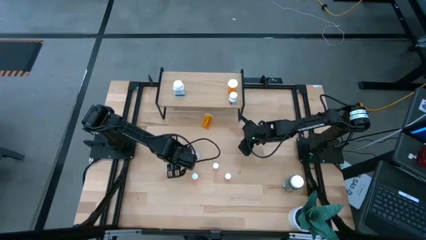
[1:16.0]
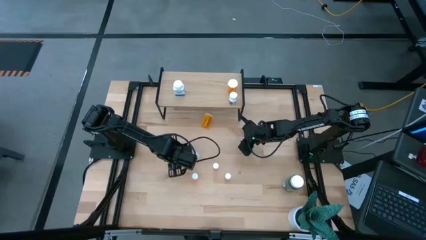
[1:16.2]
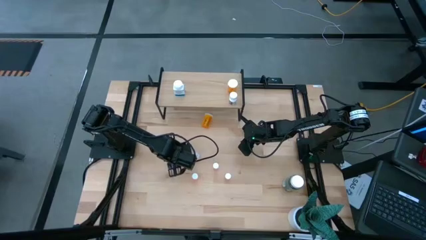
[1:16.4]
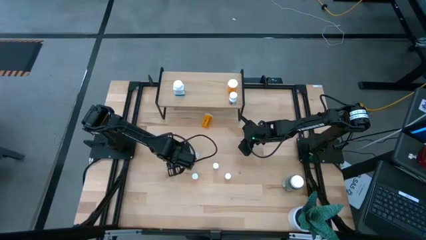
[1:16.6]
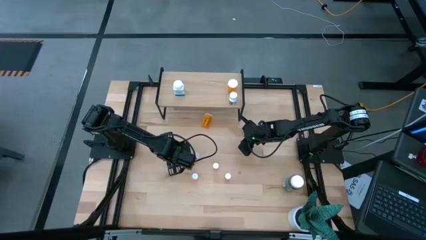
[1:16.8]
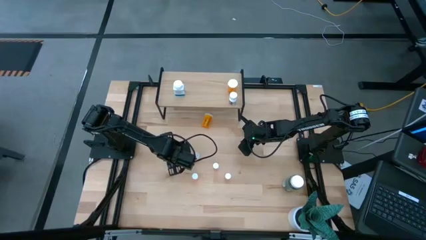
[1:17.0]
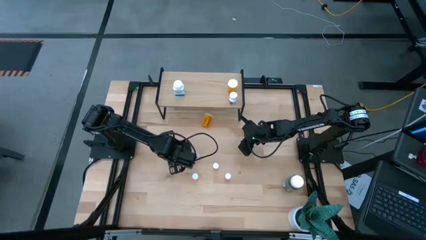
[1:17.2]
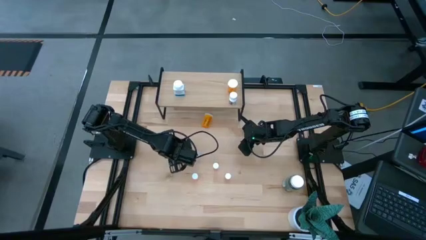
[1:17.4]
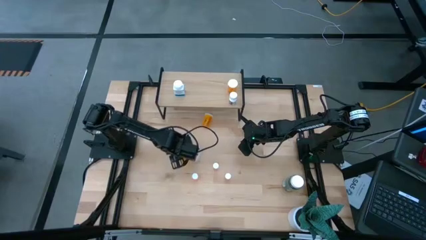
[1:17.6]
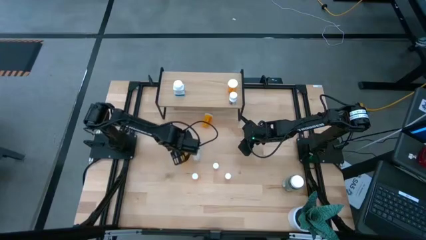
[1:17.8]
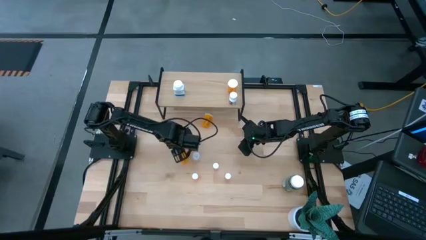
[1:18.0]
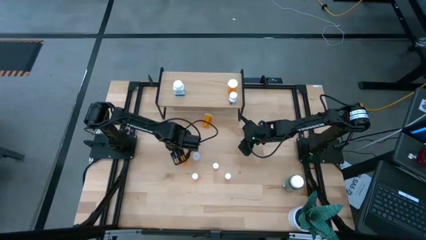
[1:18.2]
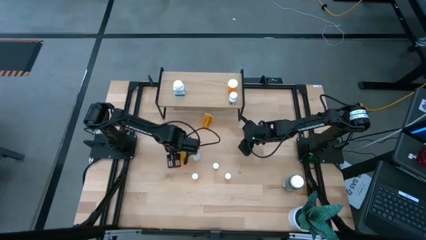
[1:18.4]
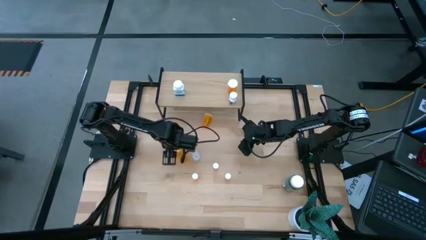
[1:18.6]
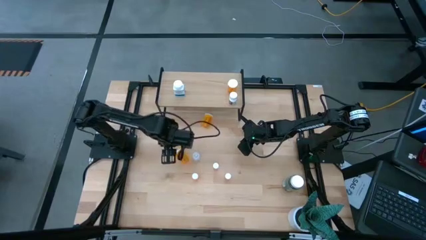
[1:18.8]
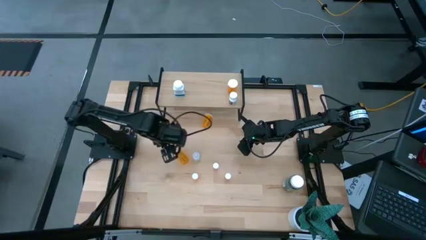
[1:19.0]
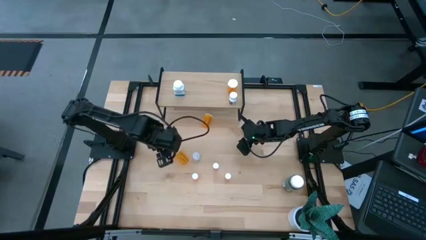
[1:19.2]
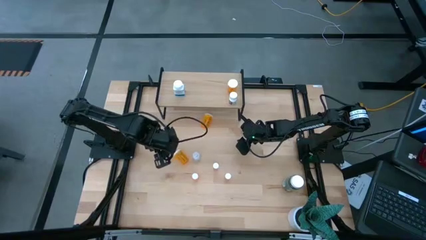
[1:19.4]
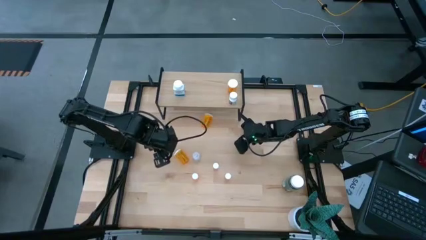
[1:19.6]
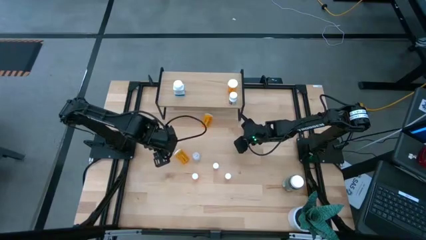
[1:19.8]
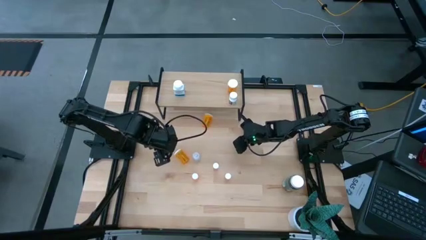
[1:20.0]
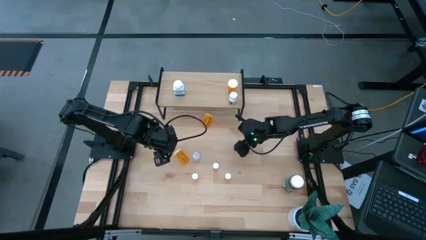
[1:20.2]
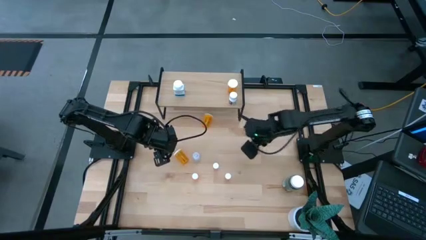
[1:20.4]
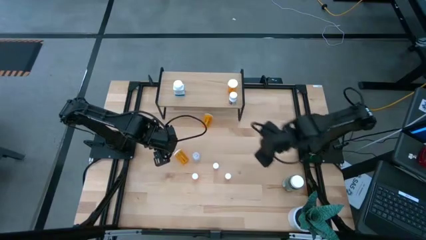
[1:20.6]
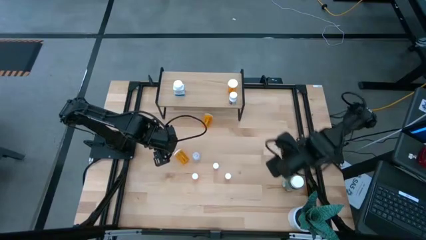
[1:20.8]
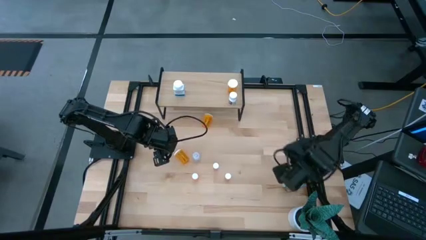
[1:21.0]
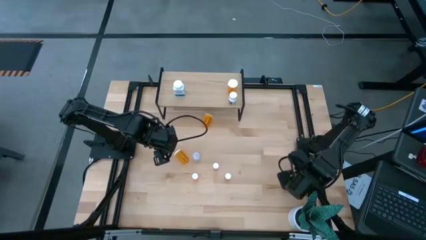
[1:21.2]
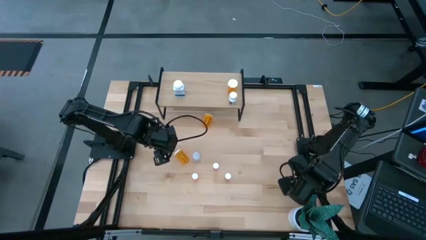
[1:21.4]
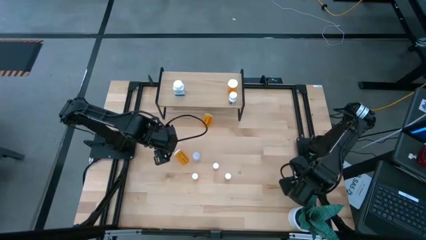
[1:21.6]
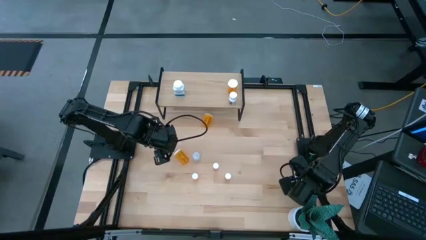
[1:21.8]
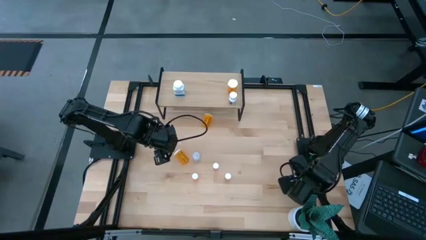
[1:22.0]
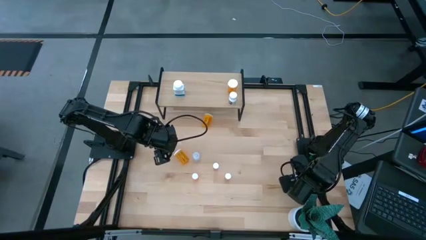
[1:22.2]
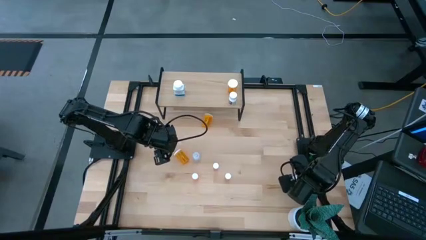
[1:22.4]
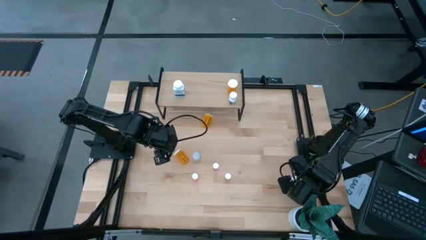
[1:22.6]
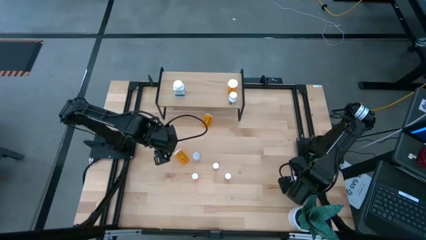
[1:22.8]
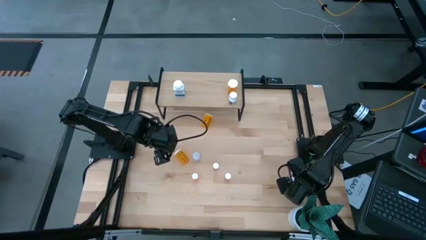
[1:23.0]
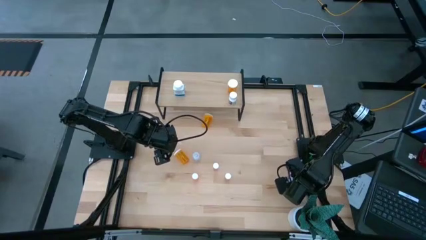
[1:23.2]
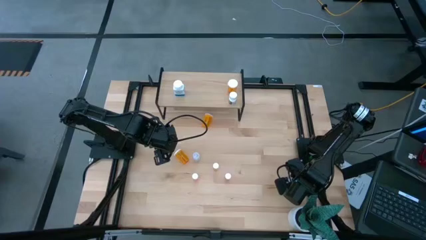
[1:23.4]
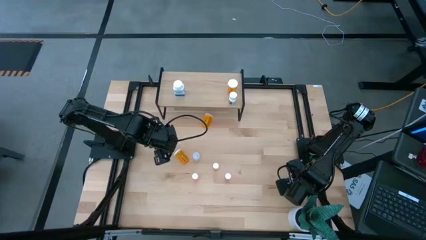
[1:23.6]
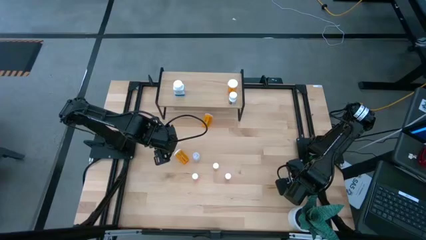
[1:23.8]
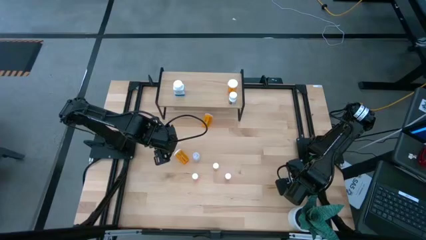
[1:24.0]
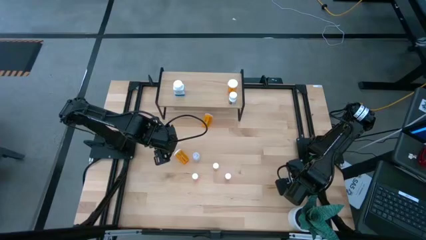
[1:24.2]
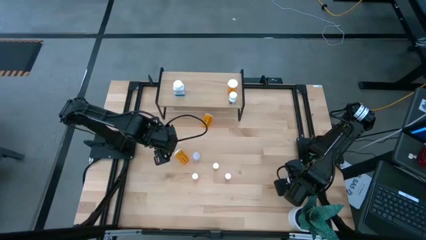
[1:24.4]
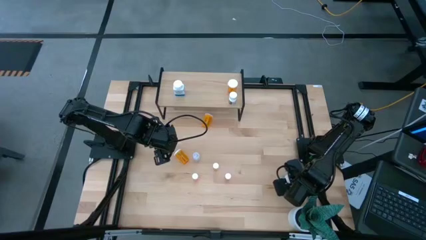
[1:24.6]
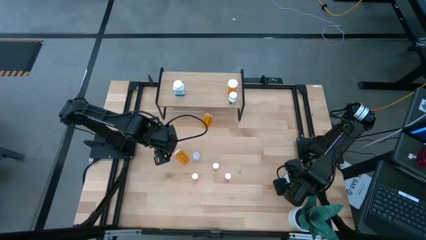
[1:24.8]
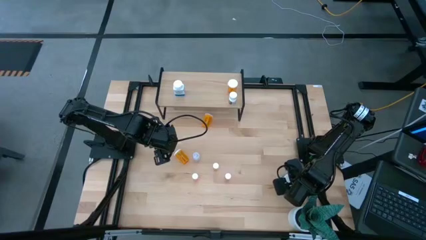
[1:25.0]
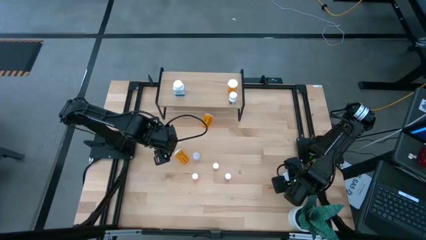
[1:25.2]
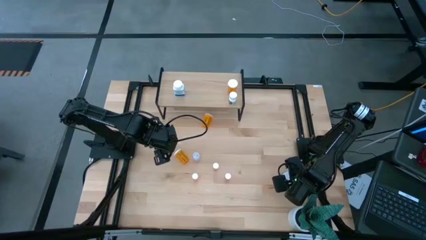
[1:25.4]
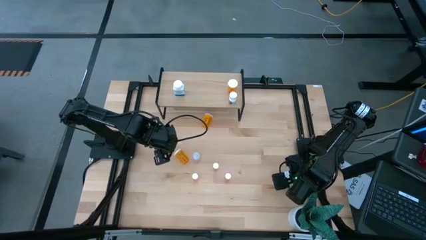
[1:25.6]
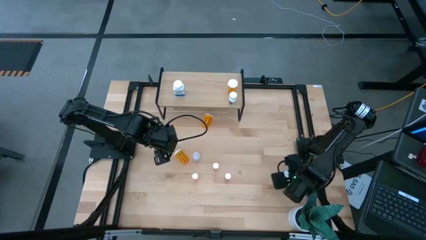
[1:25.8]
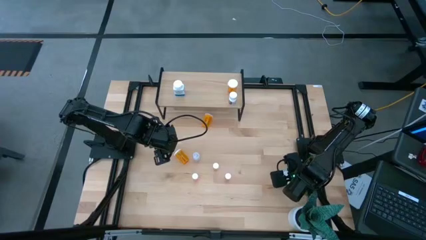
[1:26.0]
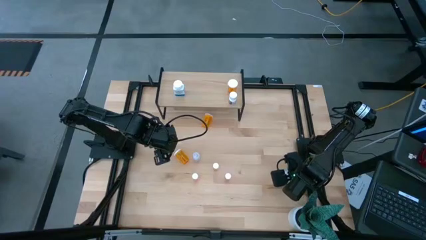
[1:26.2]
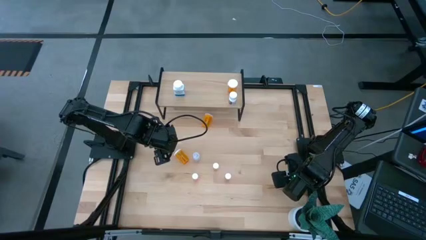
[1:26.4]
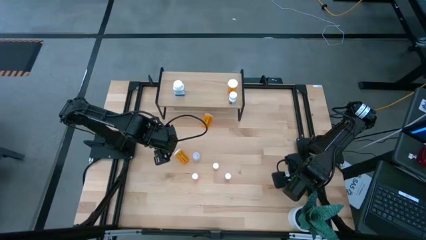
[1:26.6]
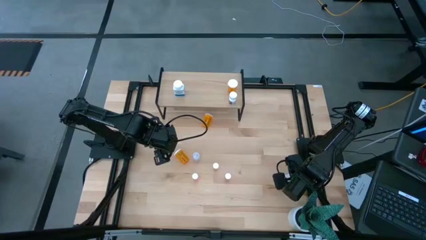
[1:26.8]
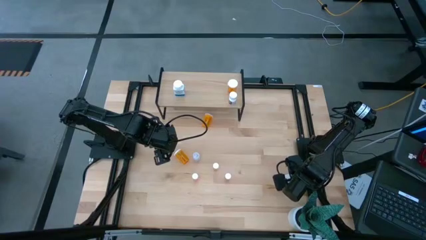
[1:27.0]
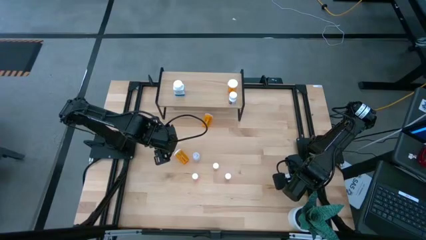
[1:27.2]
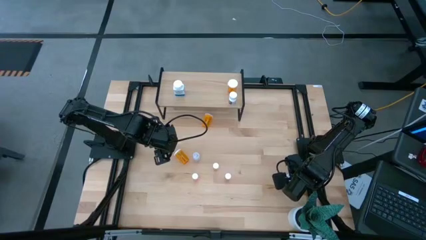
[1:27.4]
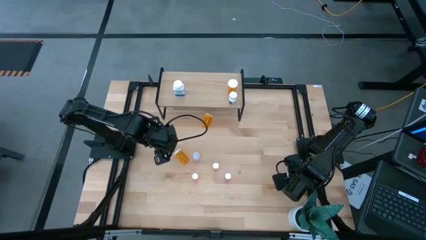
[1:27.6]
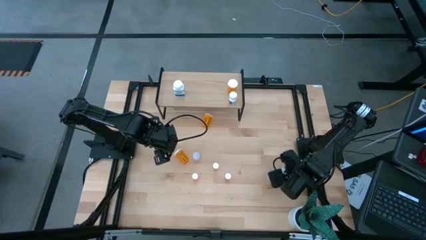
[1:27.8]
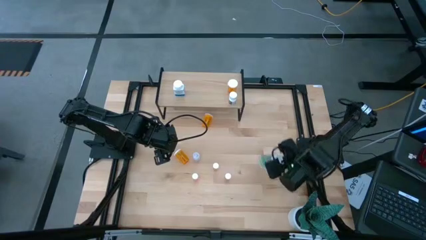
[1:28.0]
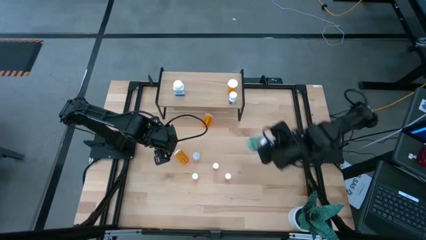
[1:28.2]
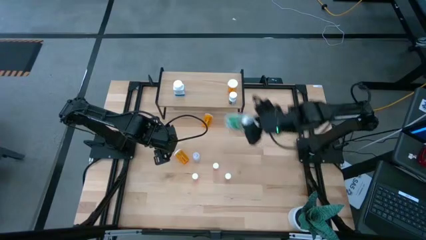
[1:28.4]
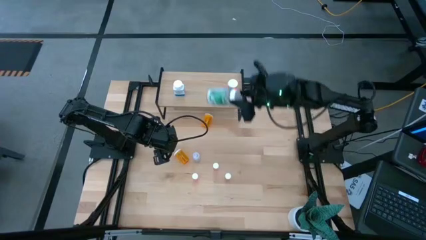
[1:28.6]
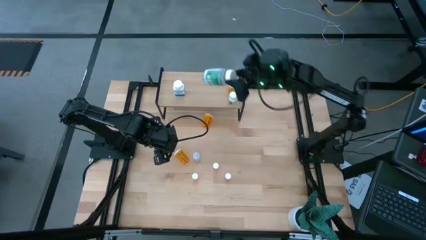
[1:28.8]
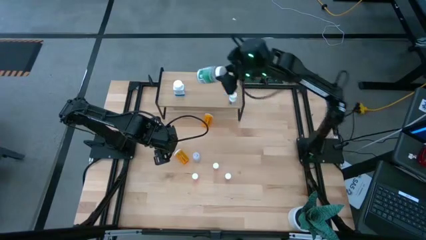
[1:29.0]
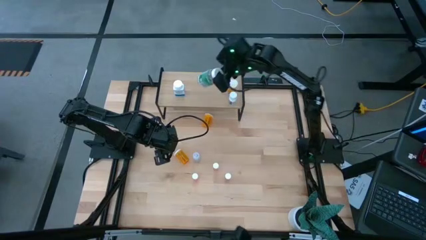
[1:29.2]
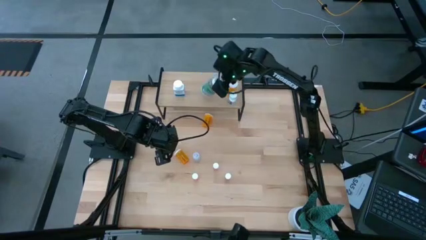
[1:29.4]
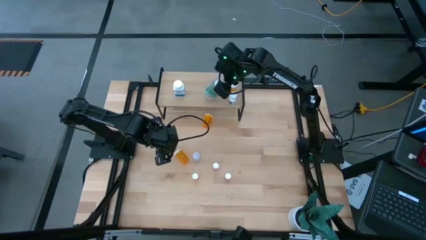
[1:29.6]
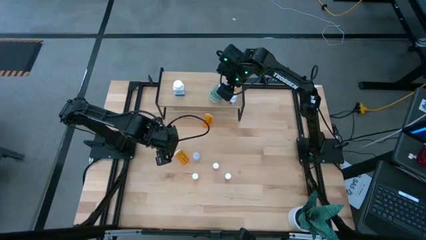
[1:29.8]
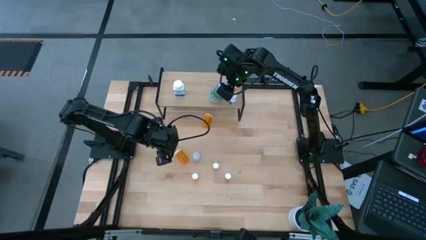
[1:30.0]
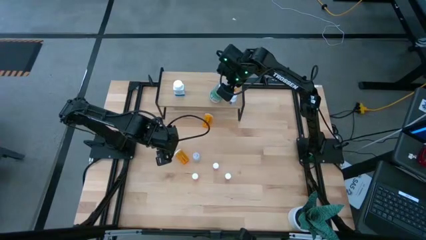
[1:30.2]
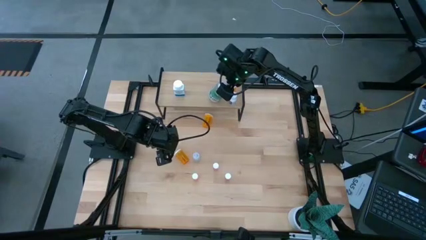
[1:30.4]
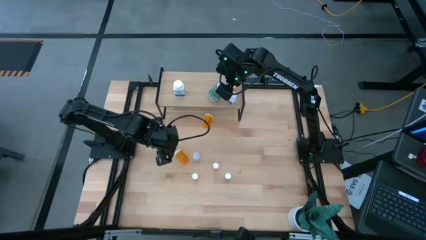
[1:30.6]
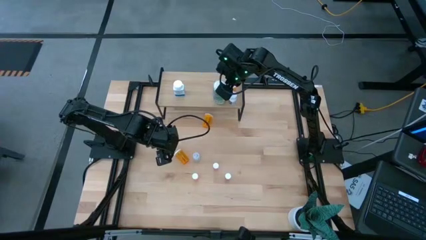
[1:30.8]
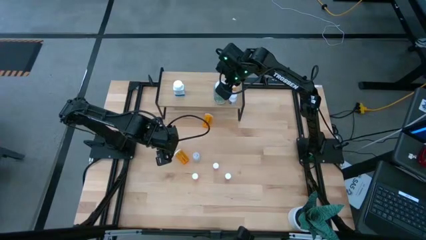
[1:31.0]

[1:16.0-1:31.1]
Task: Pick and place medicine bottles onto shelf by color
Put the green pill bottle on the shelf
